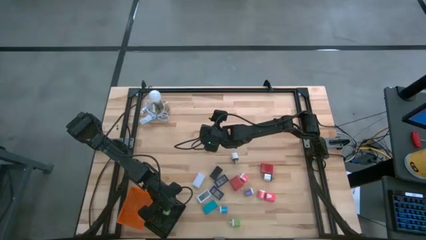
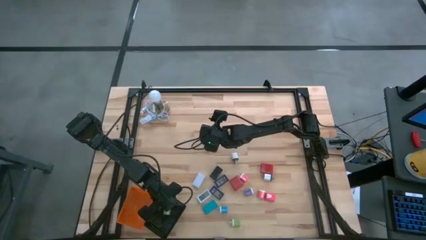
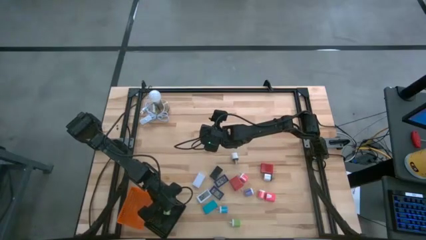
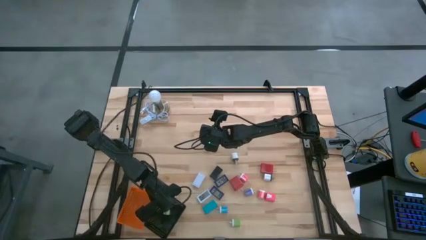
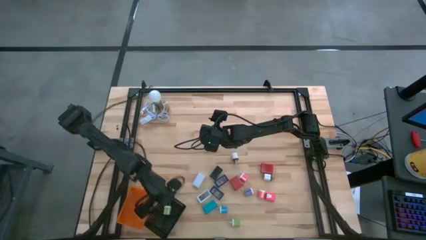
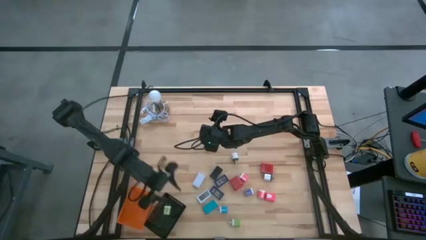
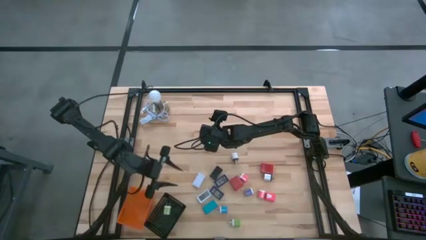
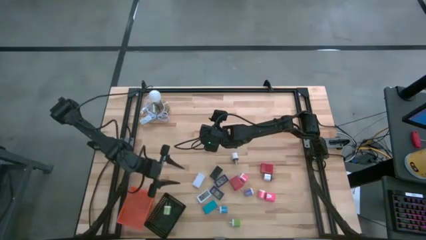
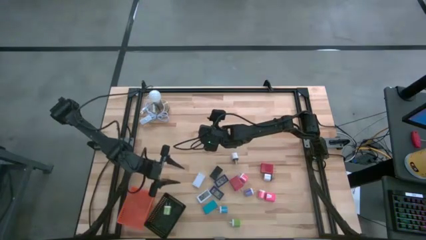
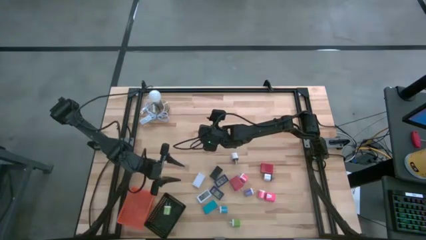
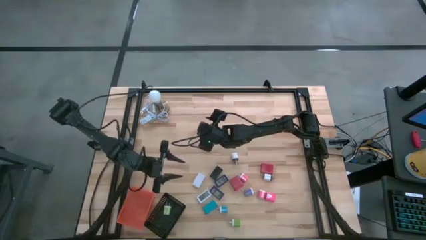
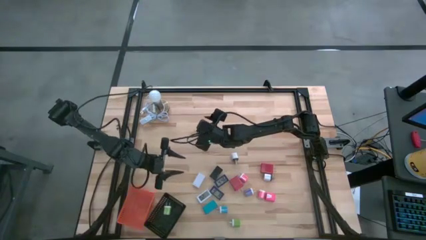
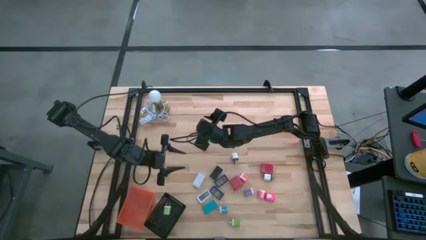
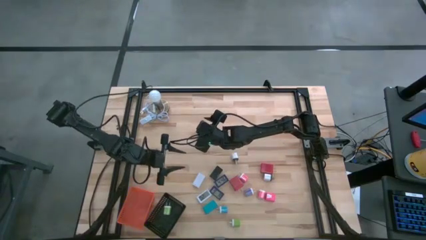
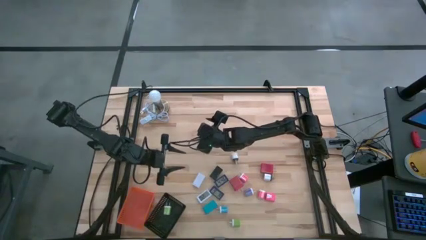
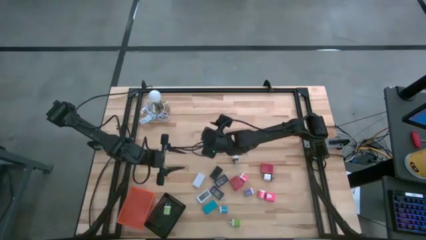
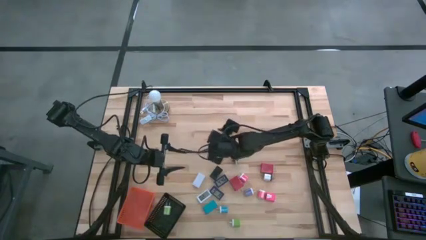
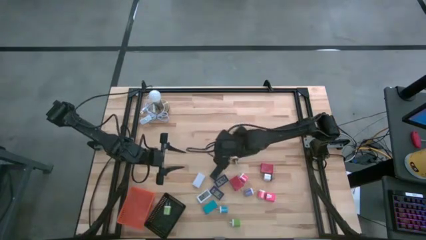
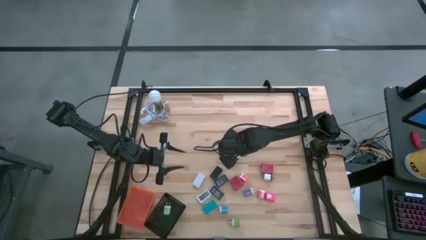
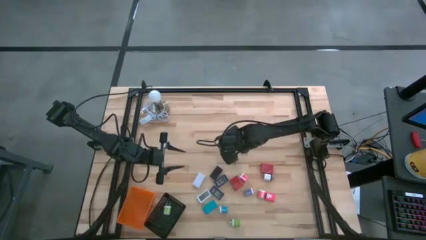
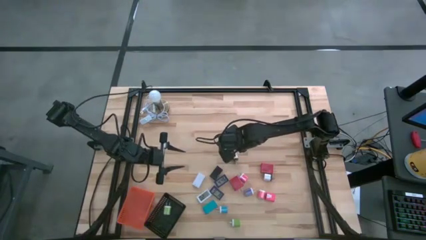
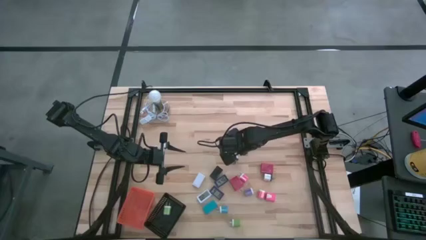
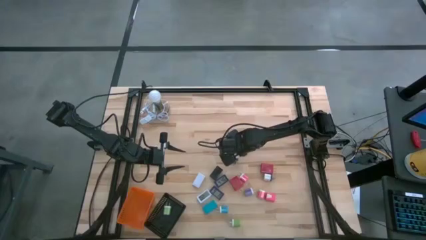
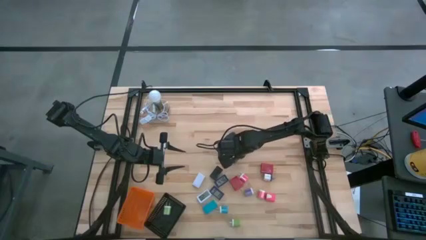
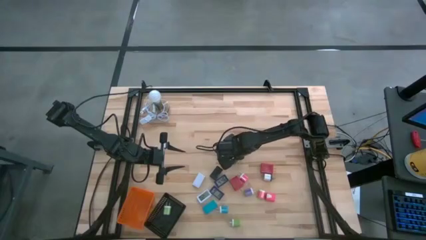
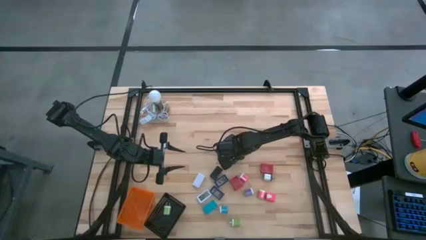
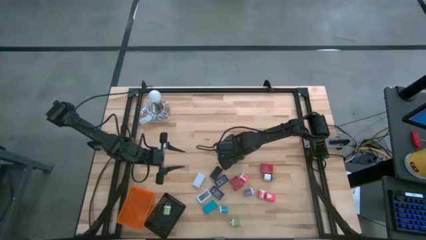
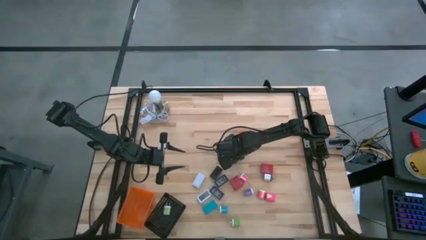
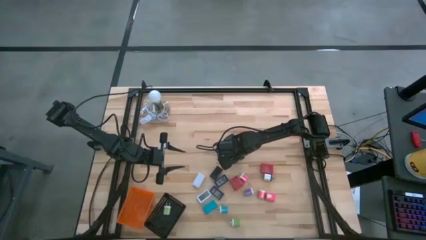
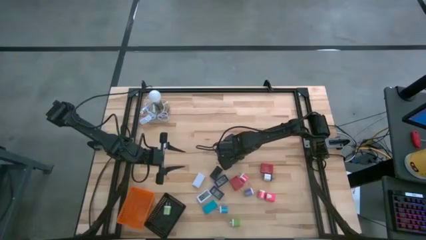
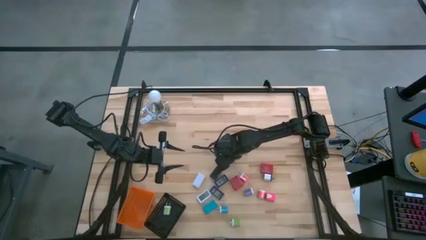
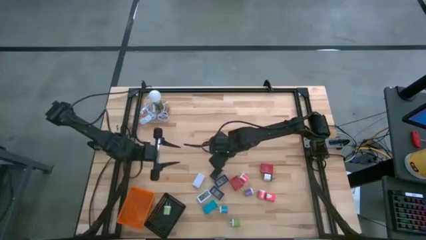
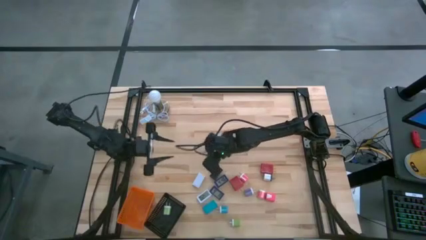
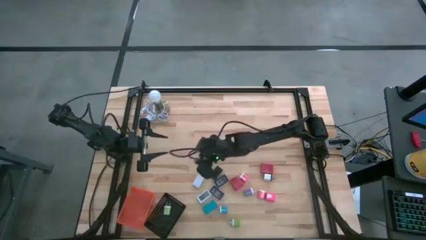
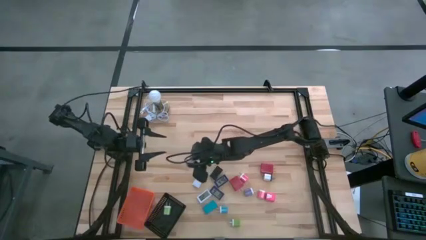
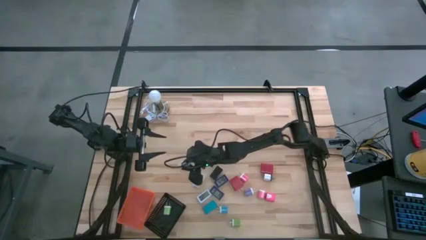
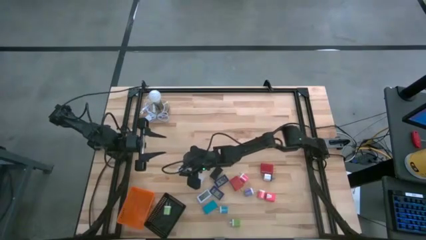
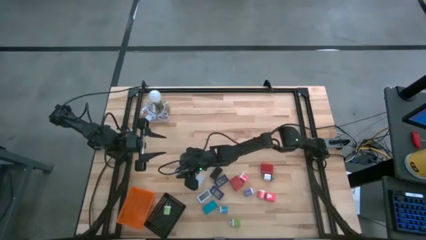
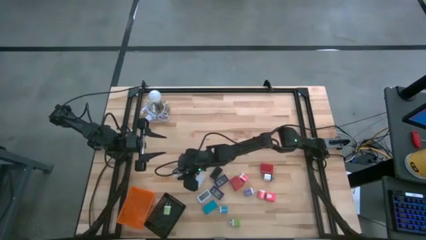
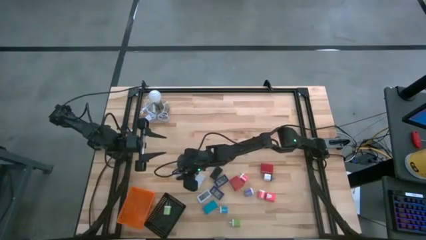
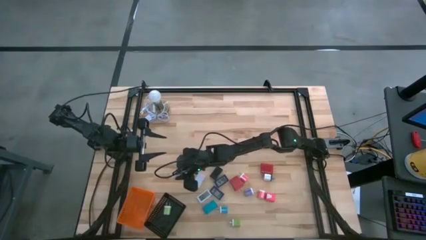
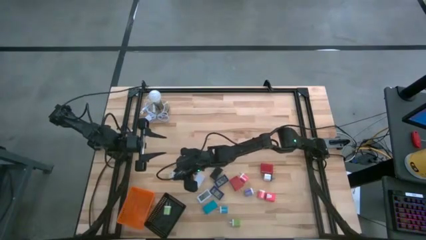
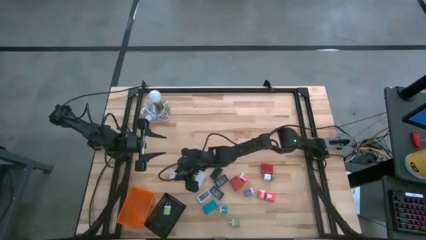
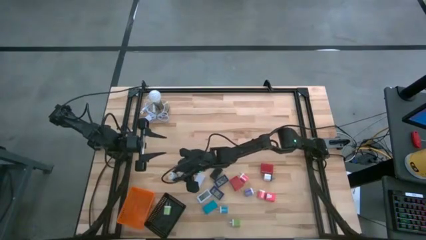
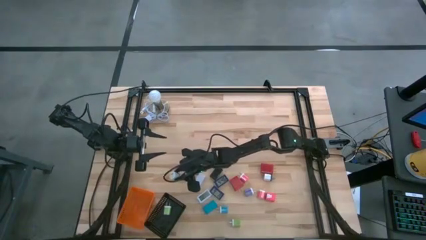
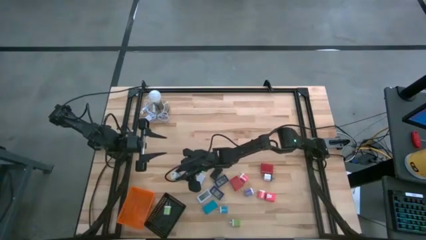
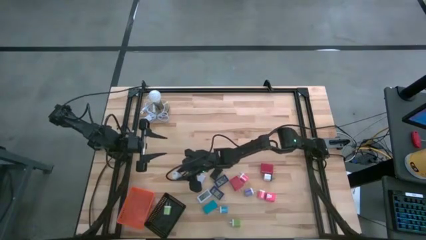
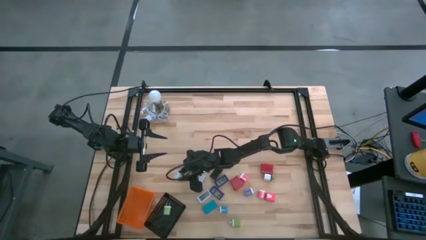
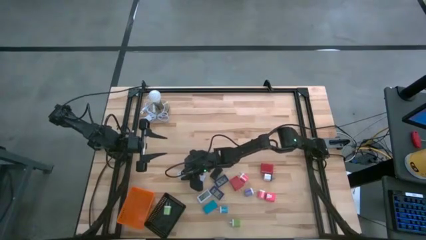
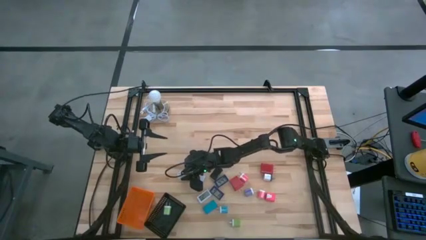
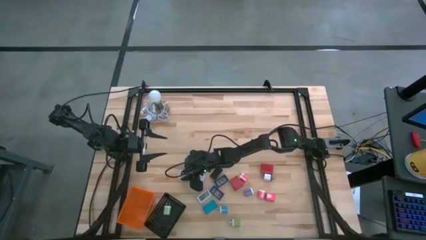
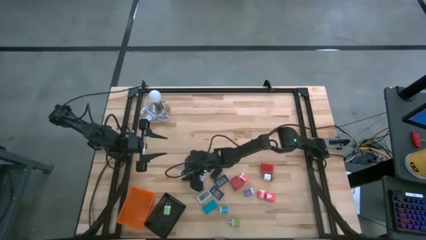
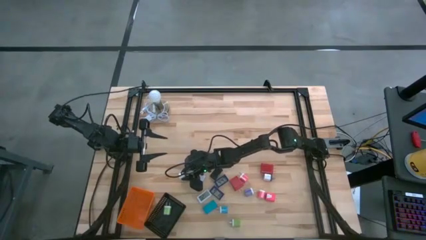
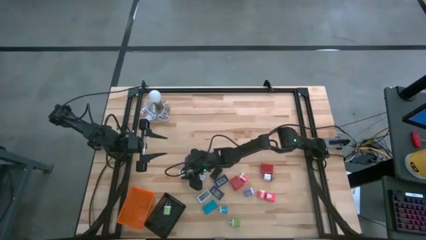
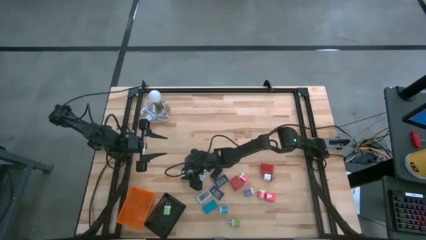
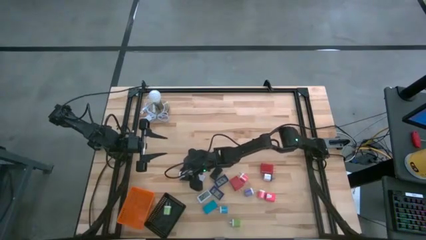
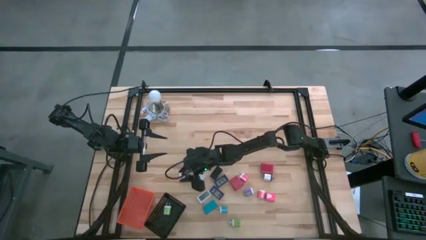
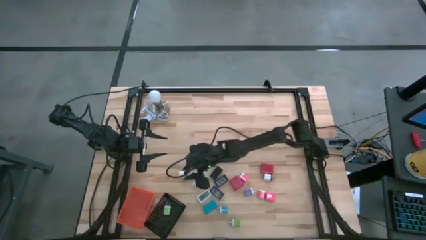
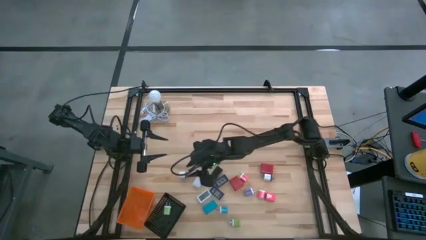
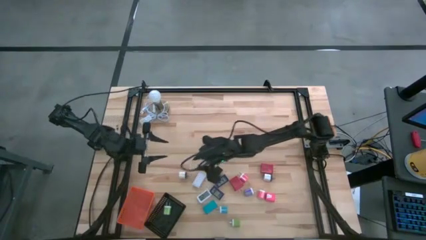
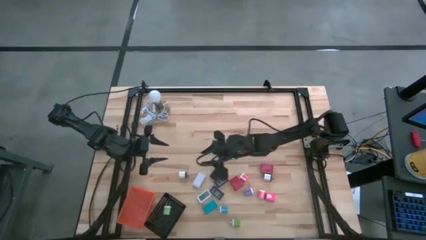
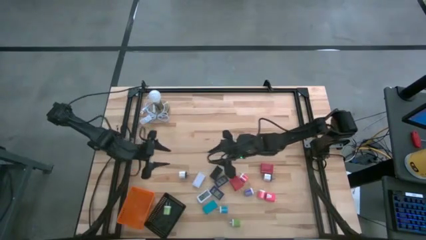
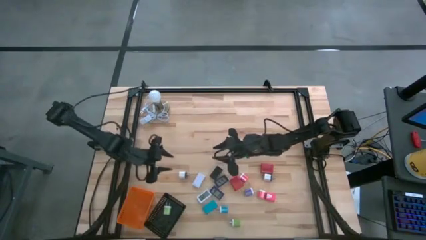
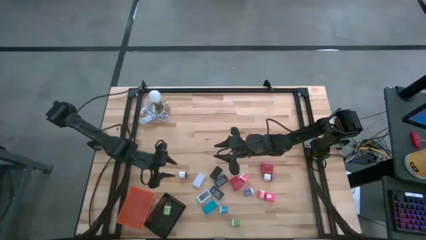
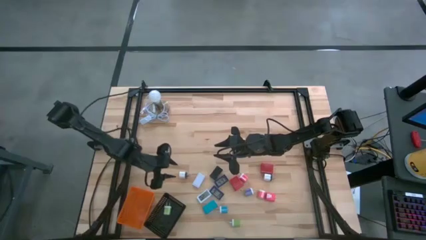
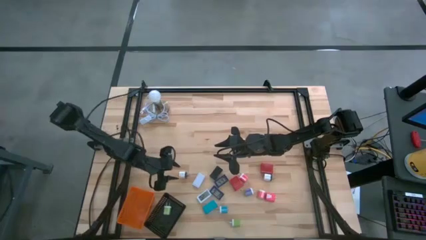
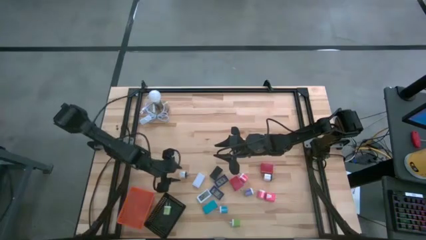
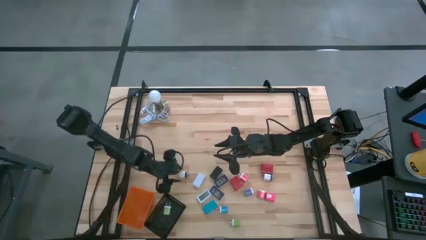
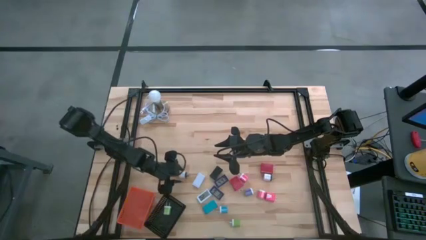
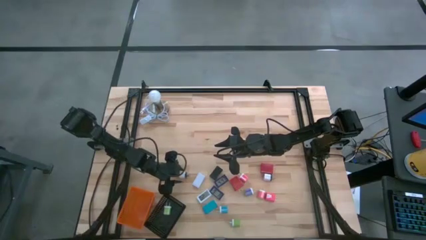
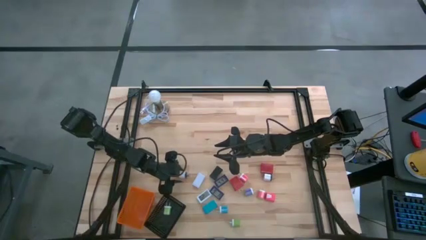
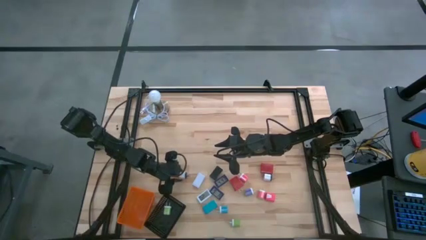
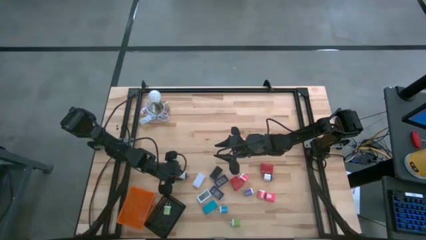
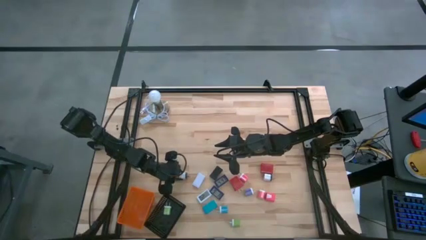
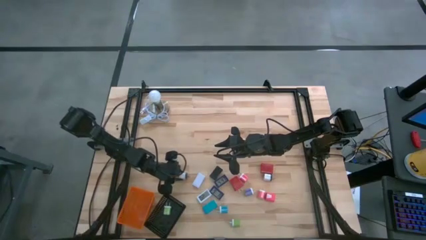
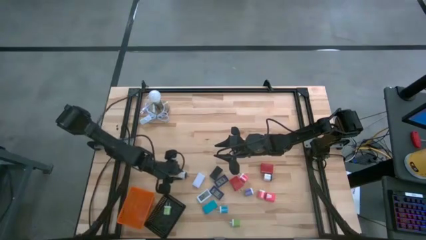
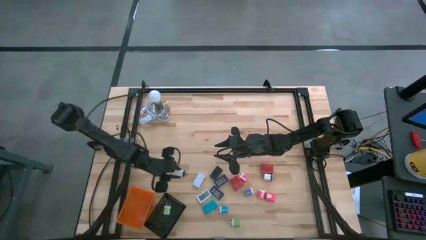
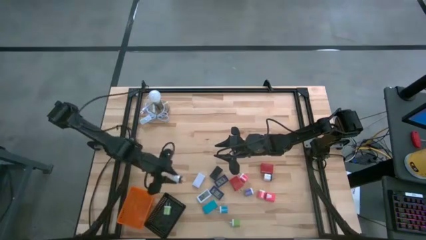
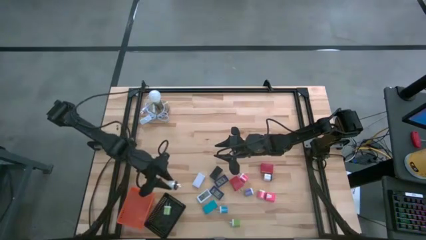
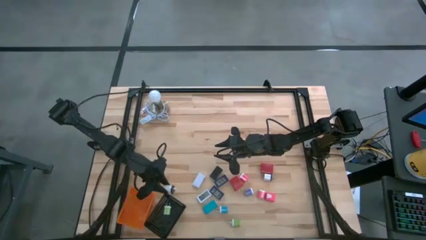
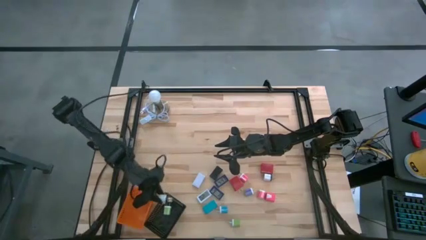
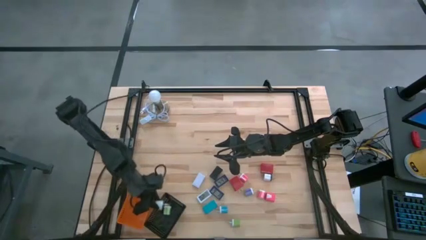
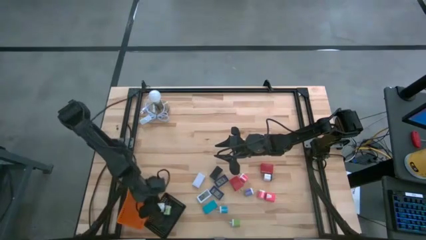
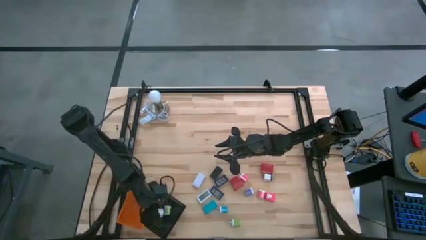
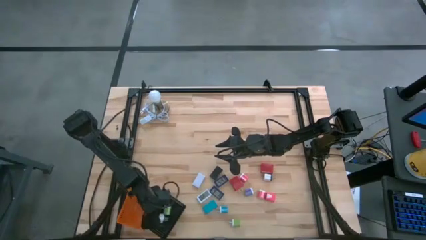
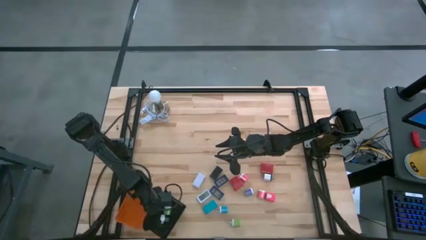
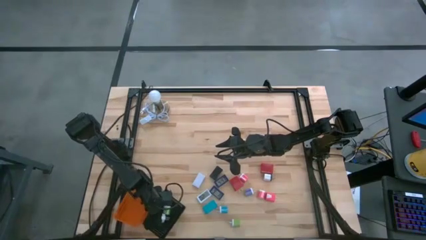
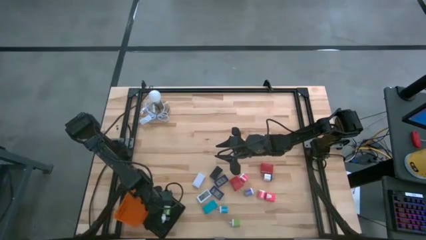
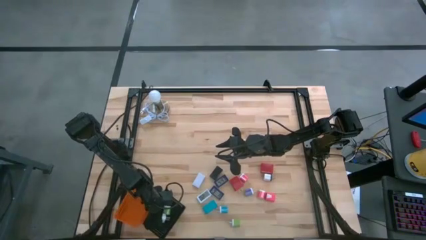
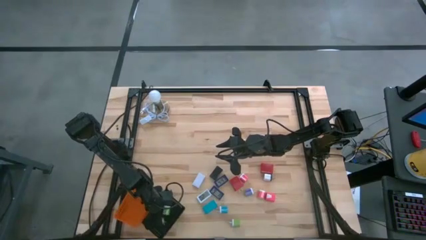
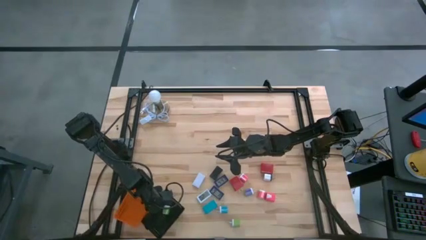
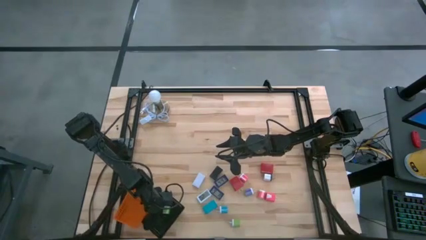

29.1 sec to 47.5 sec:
Task: Pick & Place Office items
Put the top white charger adapter into the black basket
